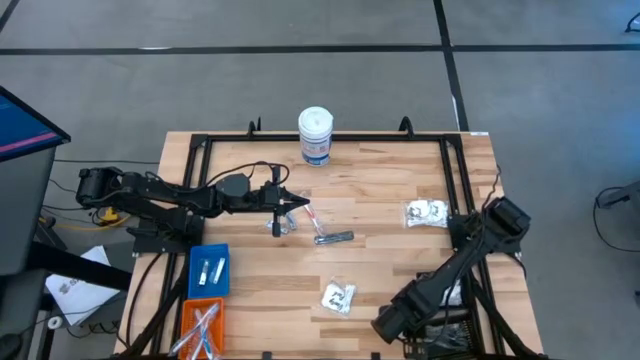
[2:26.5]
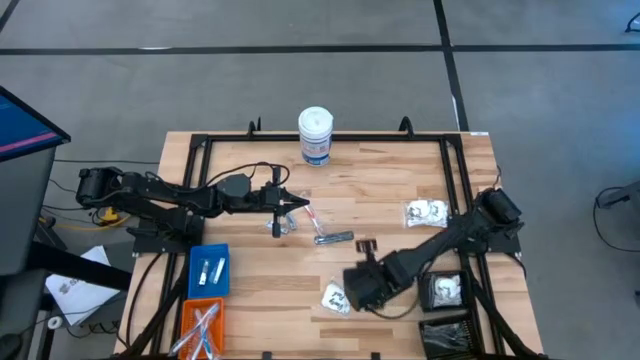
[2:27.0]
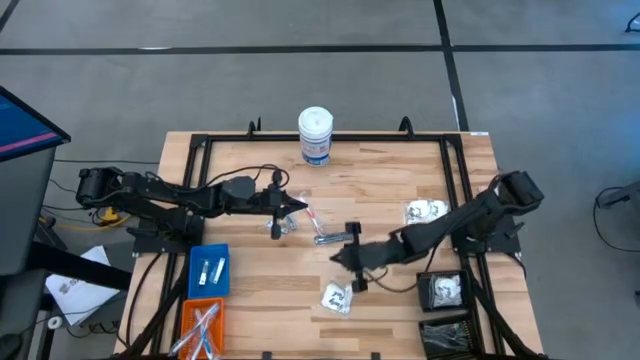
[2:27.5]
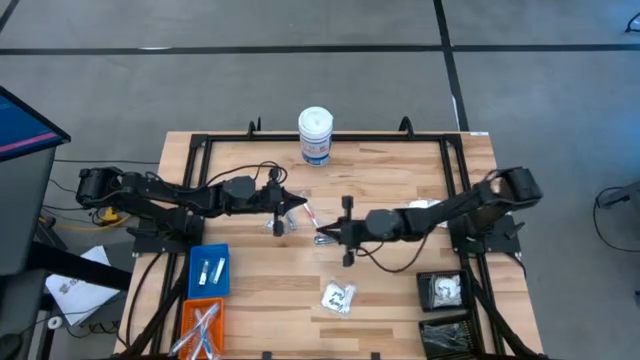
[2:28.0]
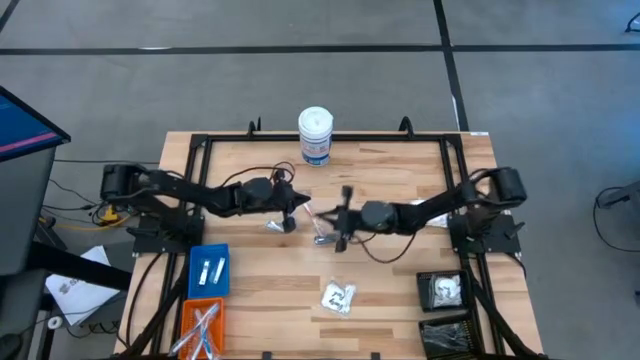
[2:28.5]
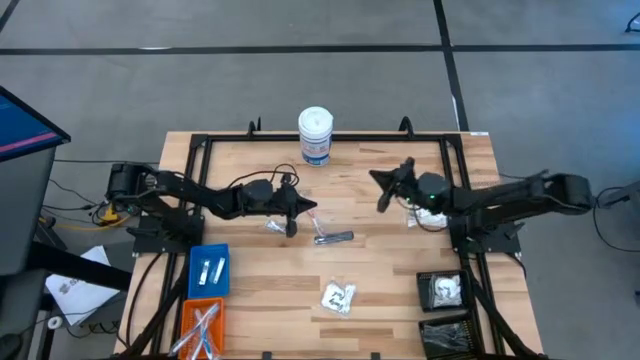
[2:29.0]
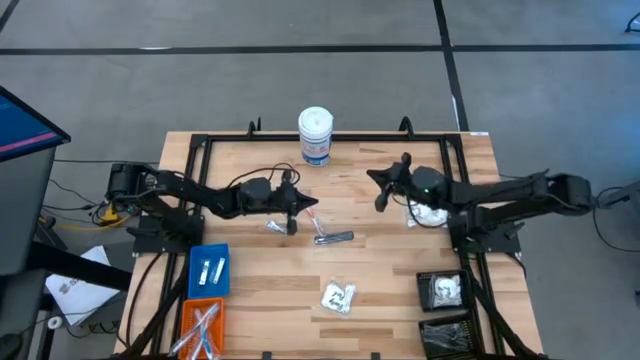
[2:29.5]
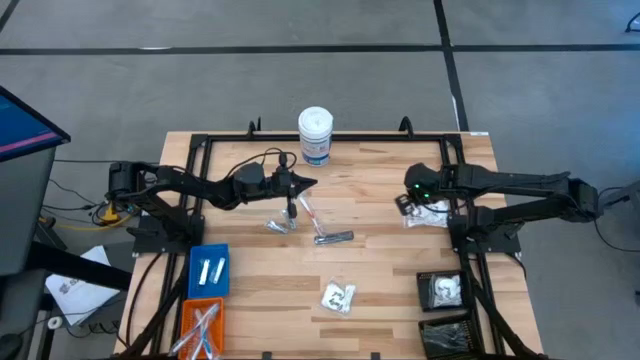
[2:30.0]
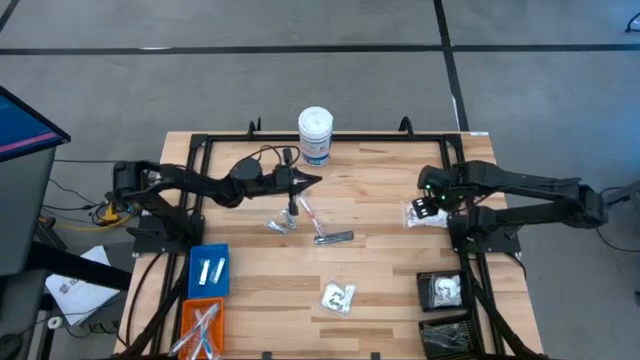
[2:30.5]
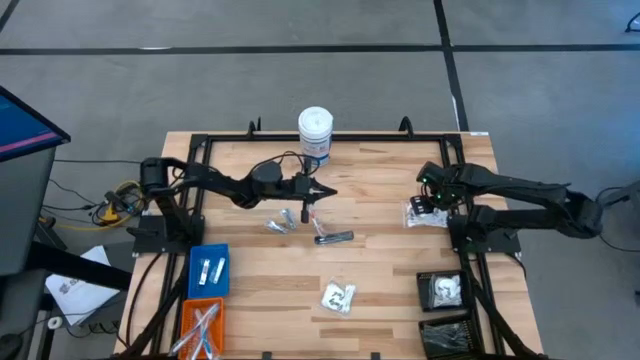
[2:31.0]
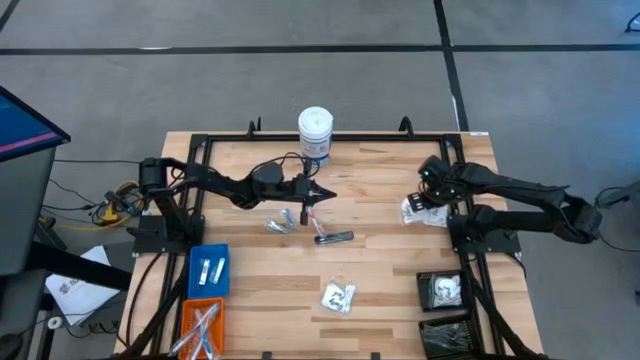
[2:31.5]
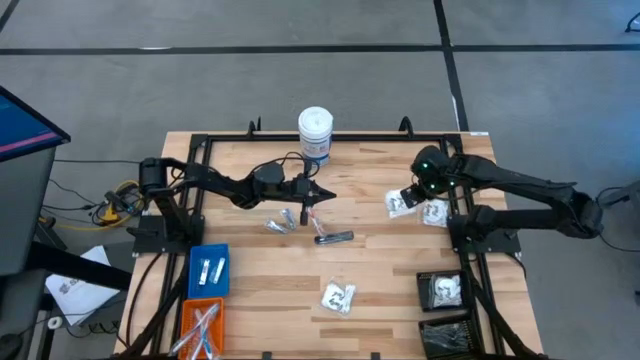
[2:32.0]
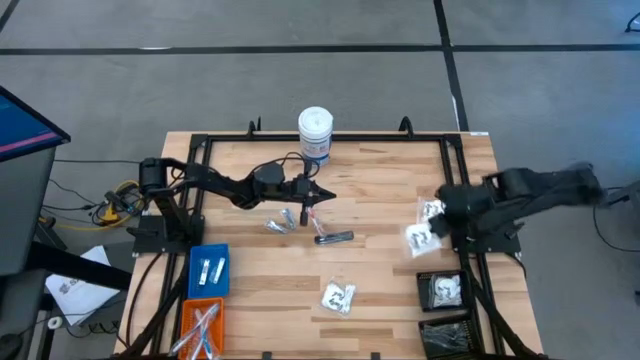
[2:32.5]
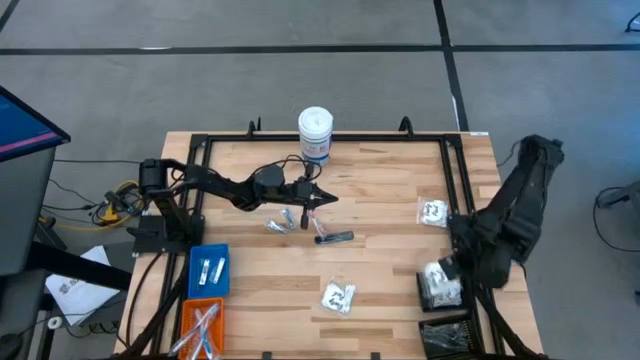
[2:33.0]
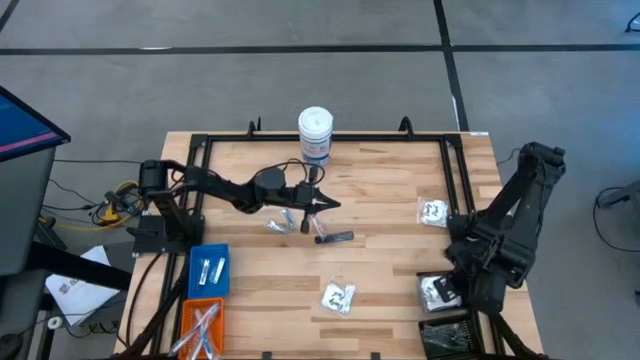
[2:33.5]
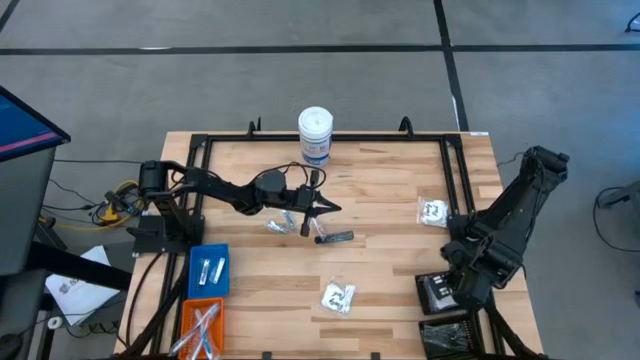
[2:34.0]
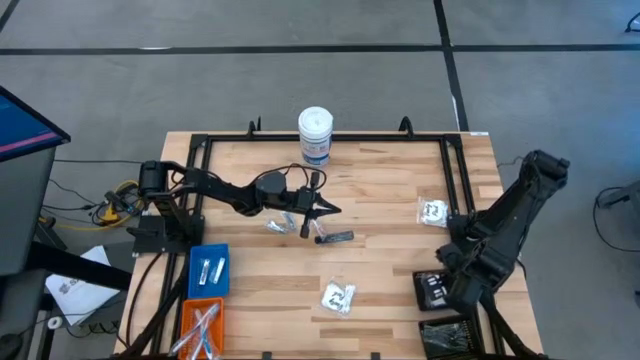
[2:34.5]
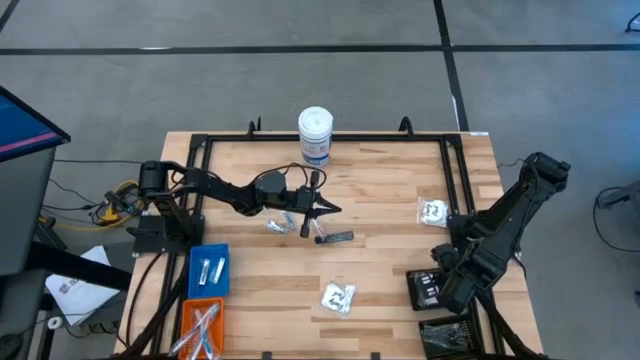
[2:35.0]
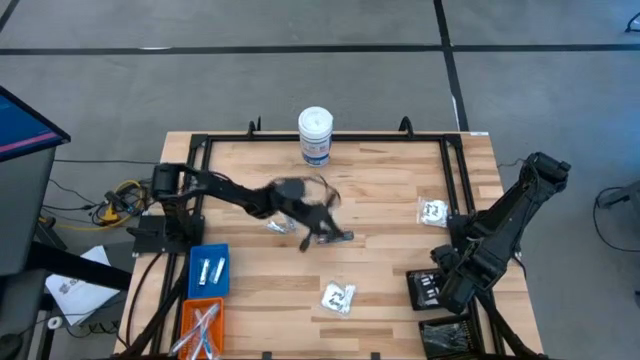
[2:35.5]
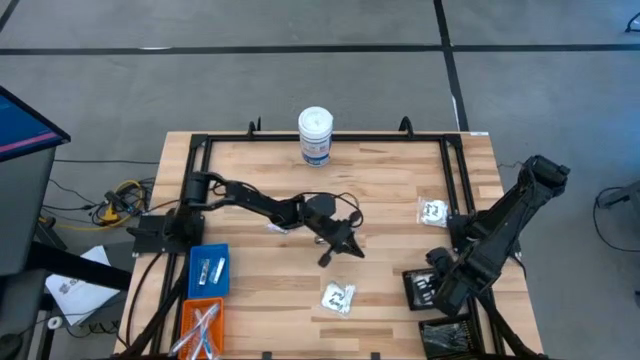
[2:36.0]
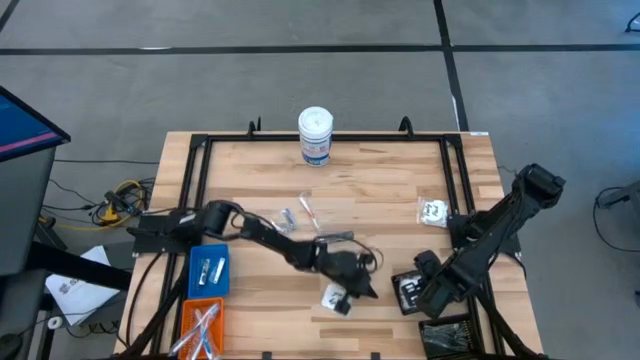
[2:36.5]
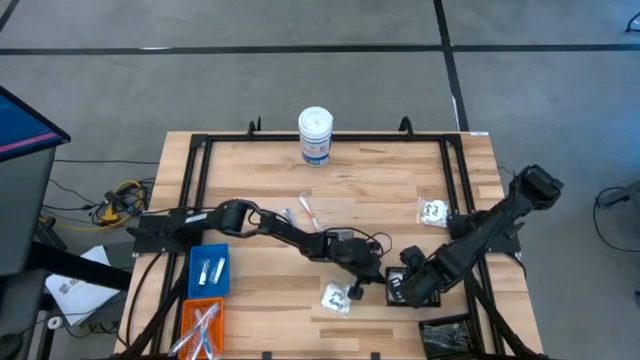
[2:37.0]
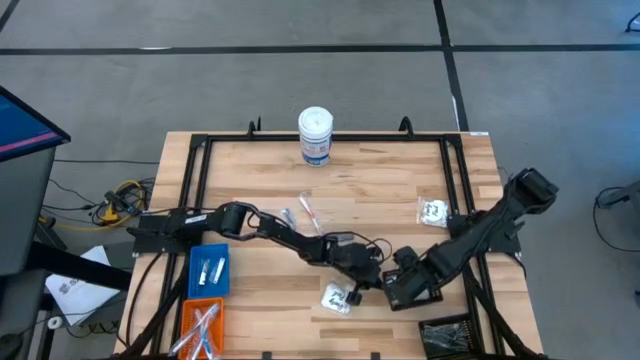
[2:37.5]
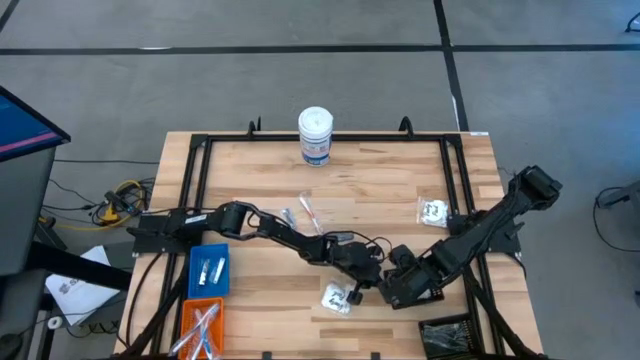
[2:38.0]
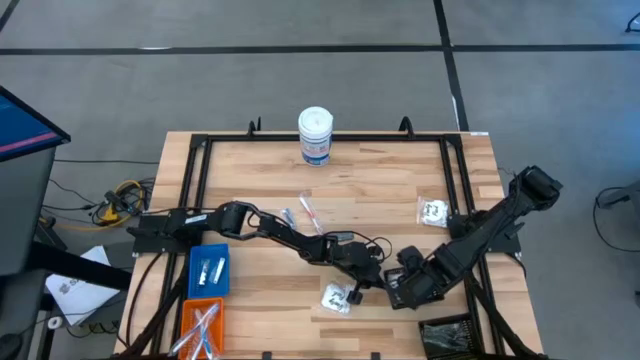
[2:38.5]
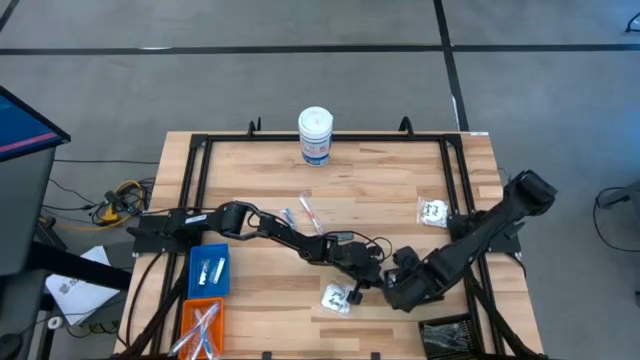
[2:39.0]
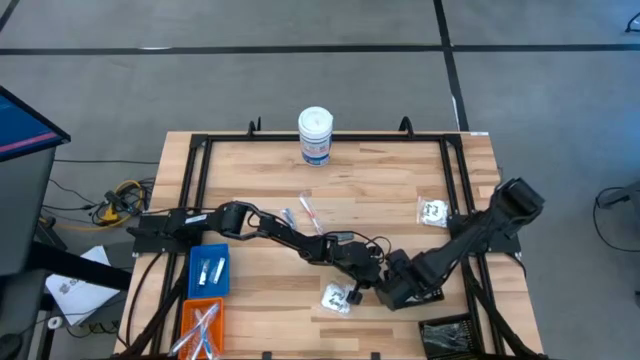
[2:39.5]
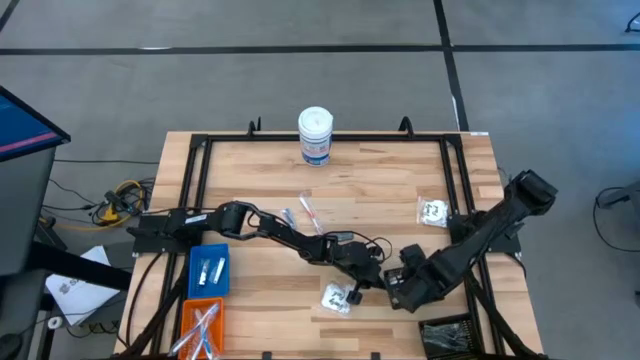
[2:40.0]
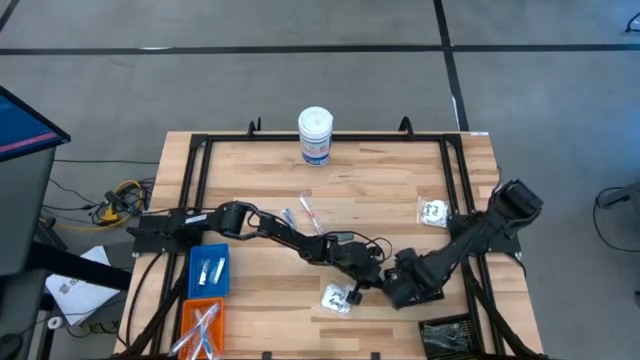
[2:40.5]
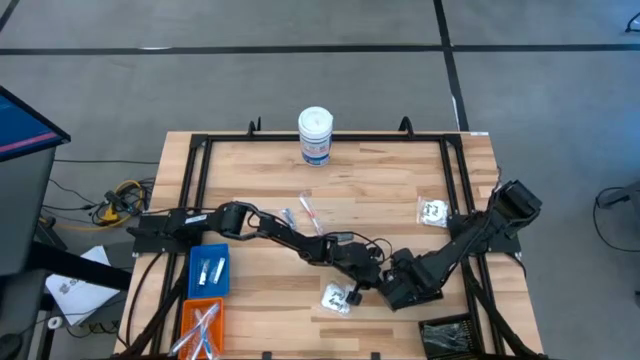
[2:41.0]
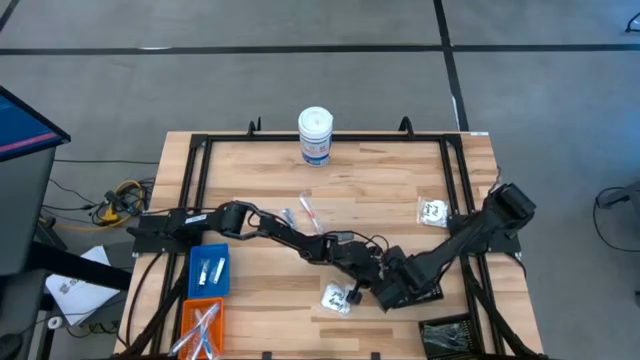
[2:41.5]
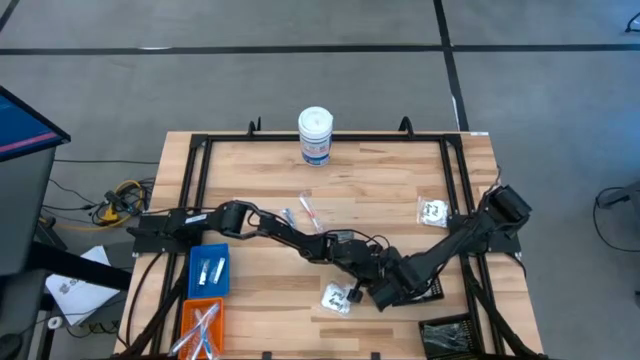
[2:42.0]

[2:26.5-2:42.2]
Task: Pick & Place Travel size toiletries
Put the white cotton swab pack into the top black bin

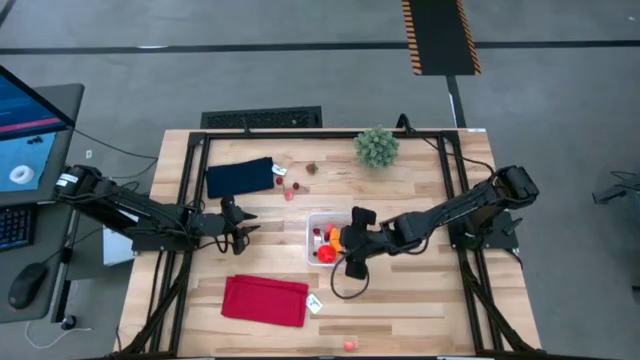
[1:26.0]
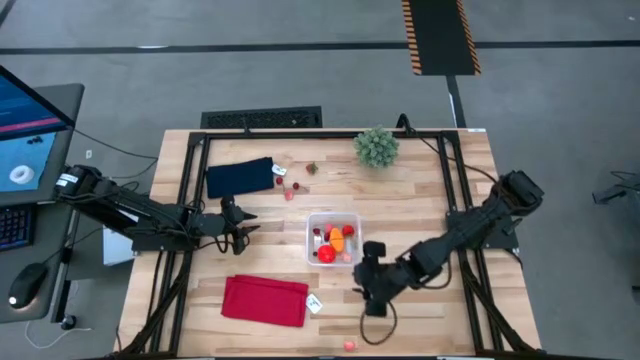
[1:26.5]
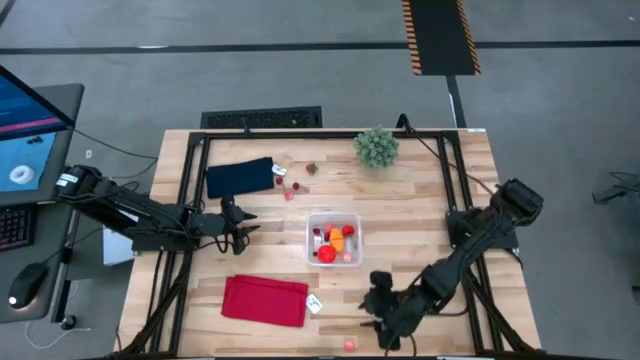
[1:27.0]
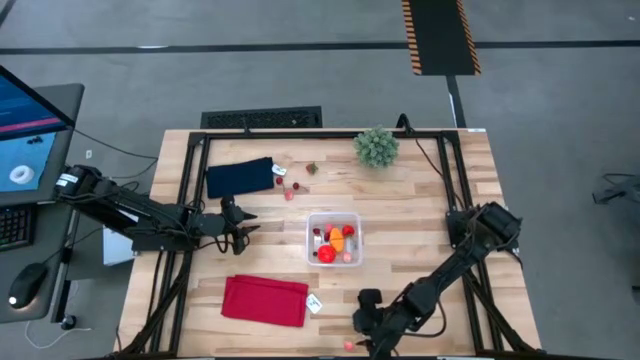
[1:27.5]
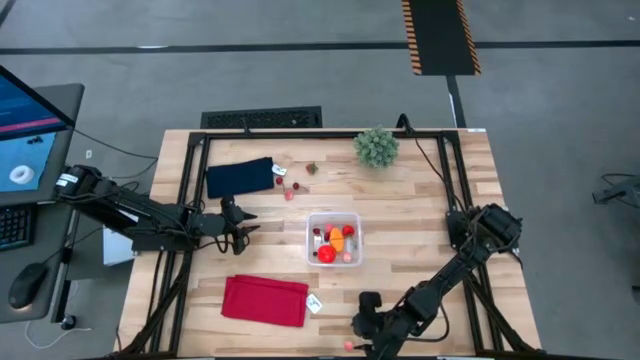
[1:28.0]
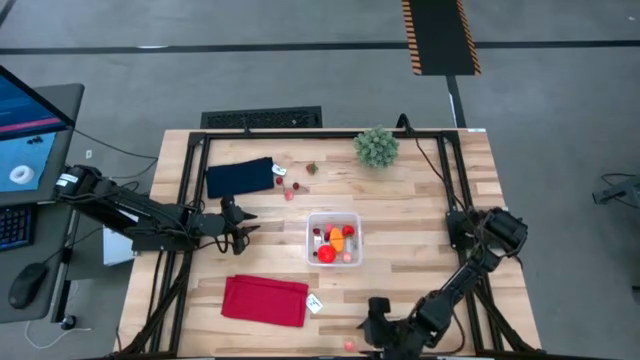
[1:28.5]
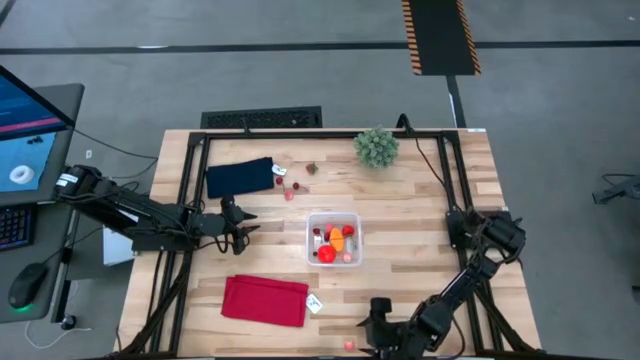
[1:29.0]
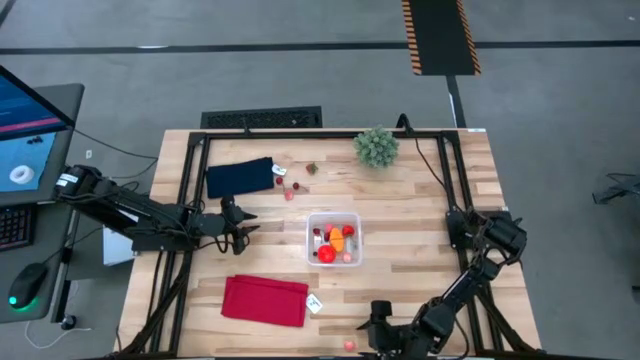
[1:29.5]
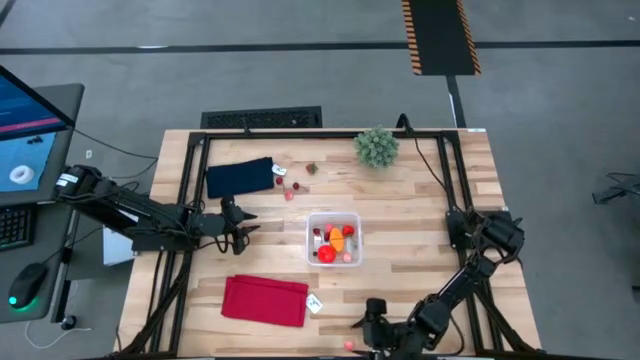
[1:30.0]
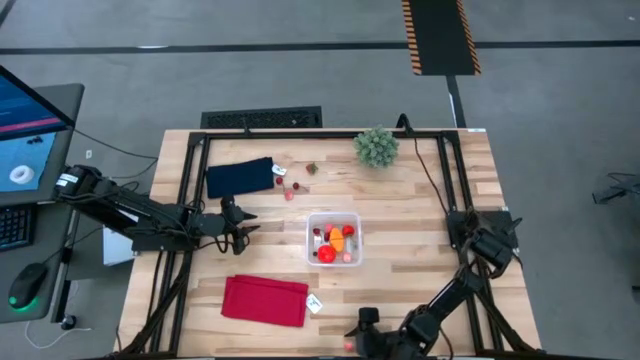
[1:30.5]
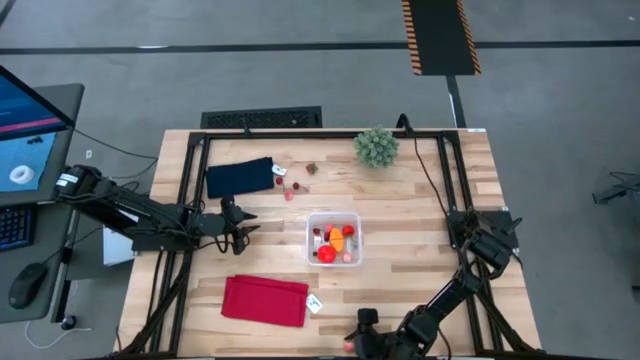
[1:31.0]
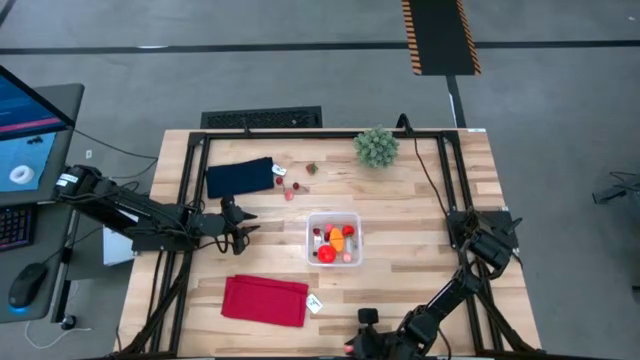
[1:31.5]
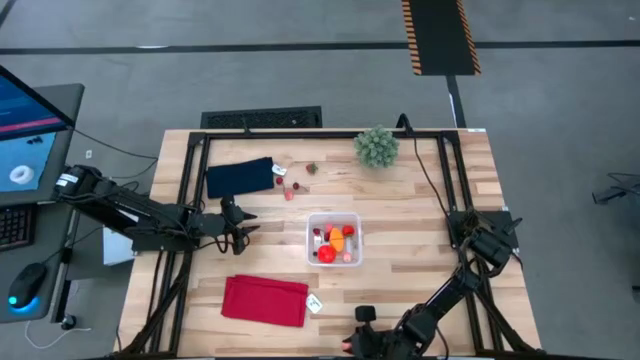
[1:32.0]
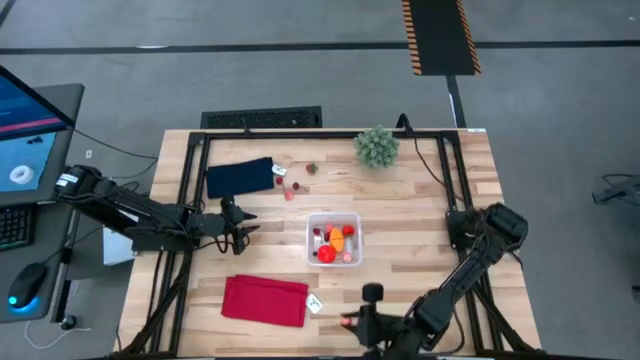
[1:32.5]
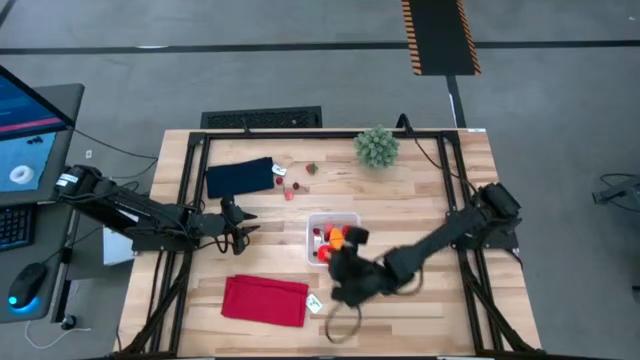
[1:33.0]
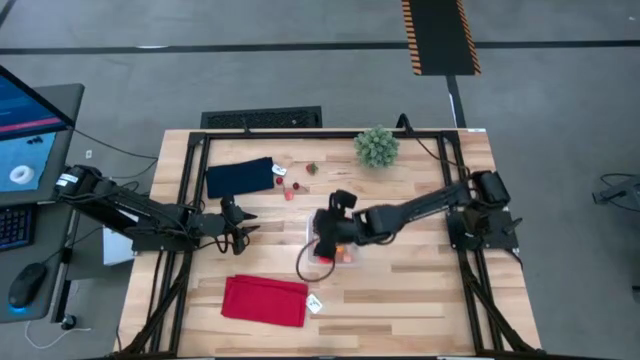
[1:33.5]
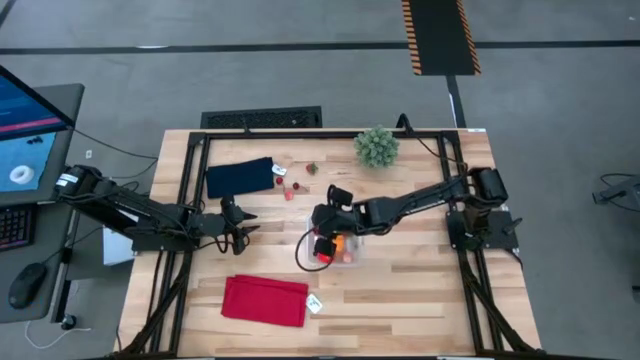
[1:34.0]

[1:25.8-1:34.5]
Task: Pick and placing Produce into tupperware
Put the pink peach into the transparent bin
